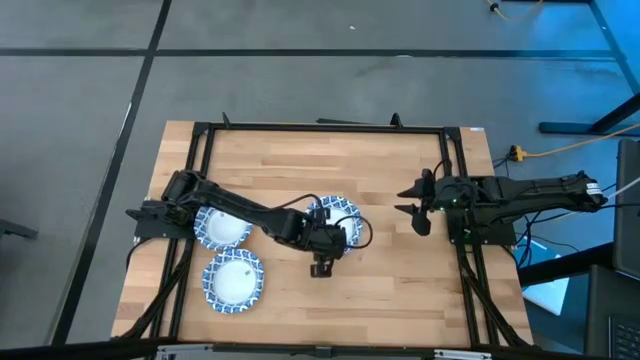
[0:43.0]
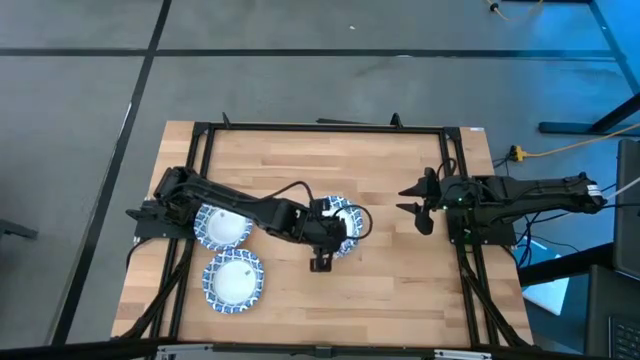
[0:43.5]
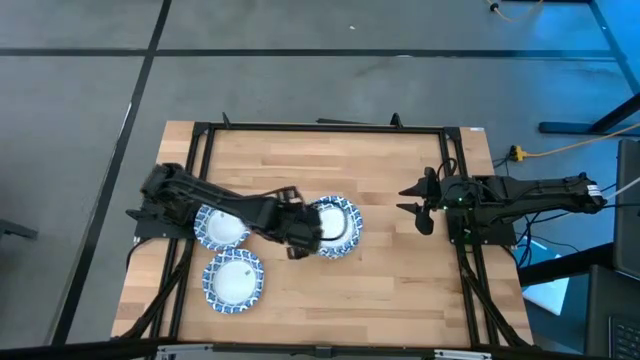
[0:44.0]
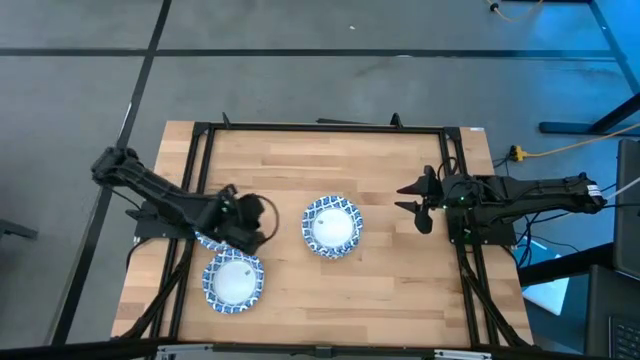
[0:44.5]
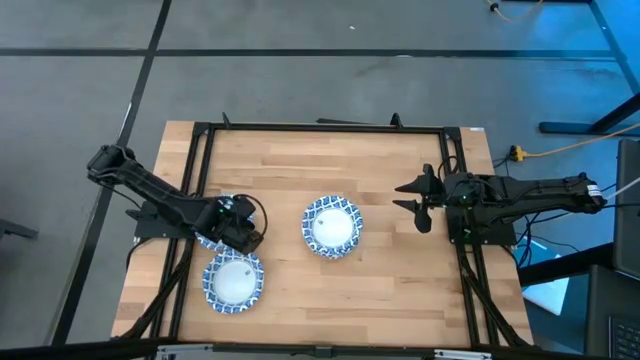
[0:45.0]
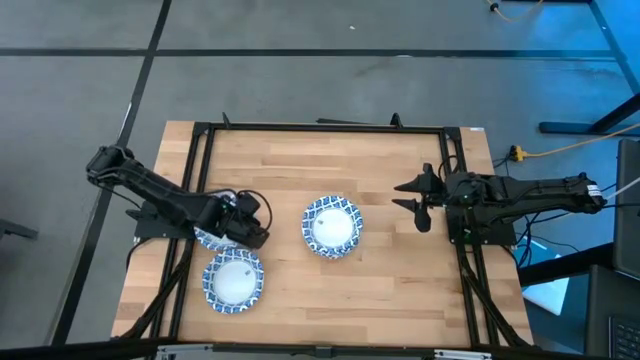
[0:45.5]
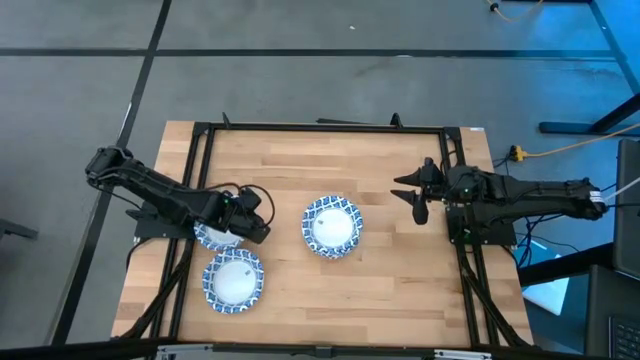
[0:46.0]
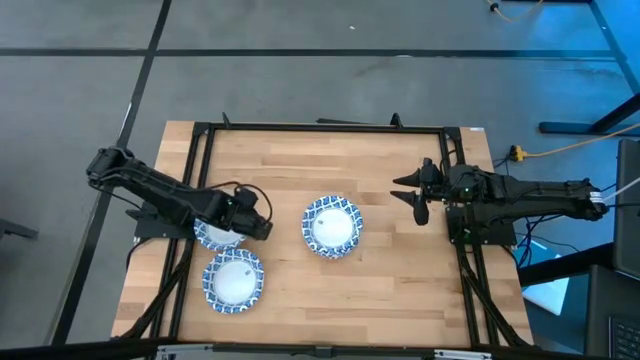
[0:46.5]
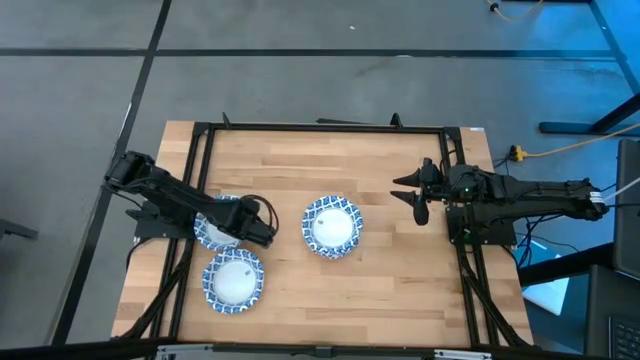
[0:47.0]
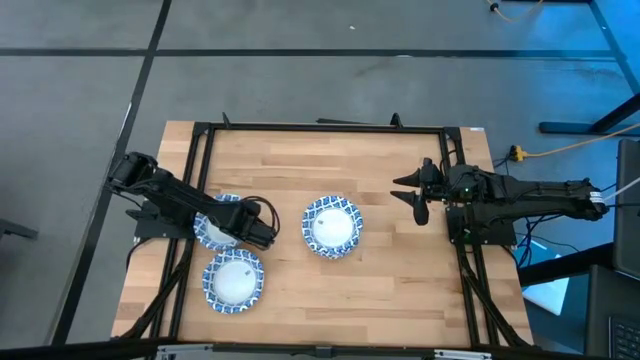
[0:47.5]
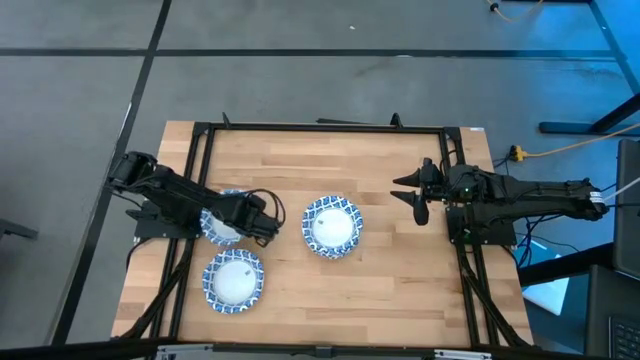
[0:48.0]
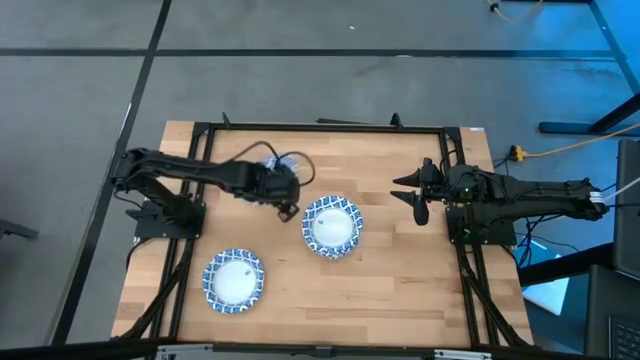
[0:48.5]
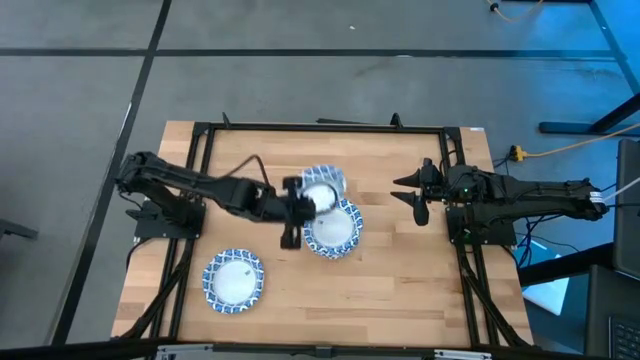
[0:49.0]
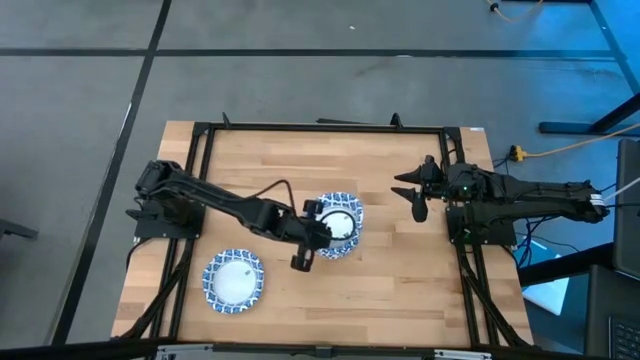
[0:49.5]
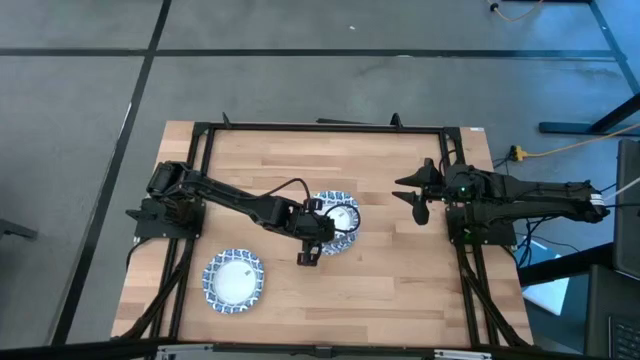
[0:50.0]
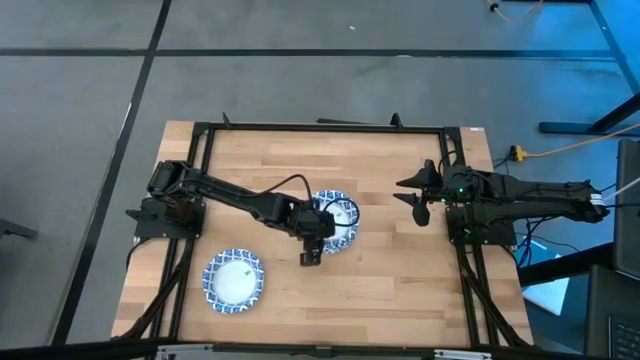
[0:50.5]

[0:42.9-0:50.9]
Task: Nest bowls inside each other
Stack the white bowl on top of the other white bowl

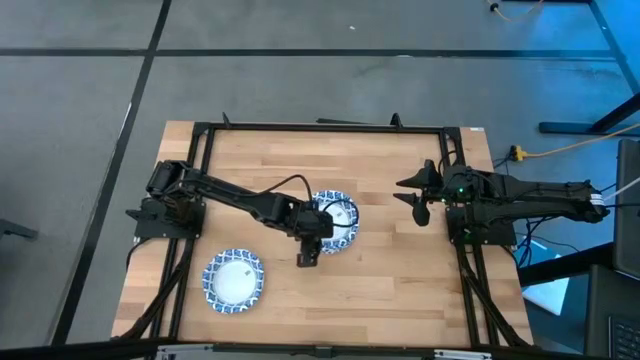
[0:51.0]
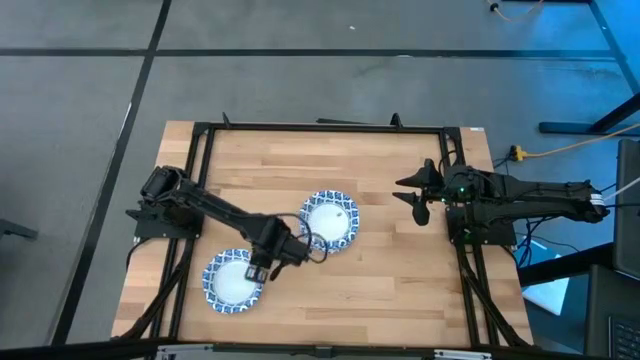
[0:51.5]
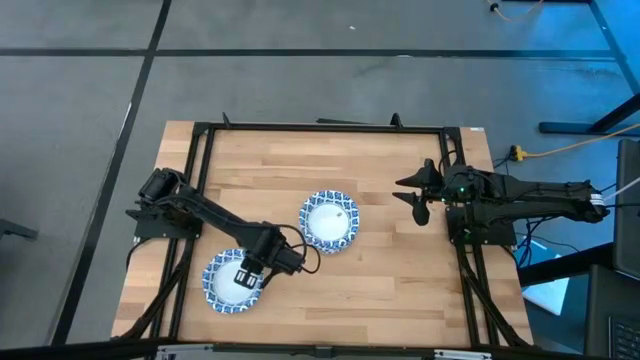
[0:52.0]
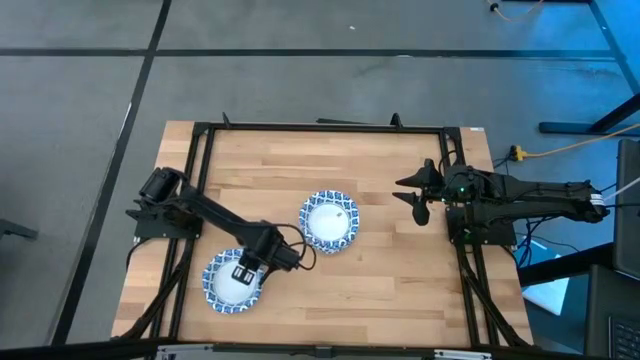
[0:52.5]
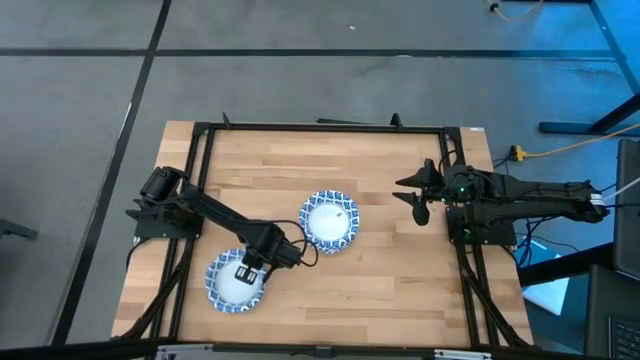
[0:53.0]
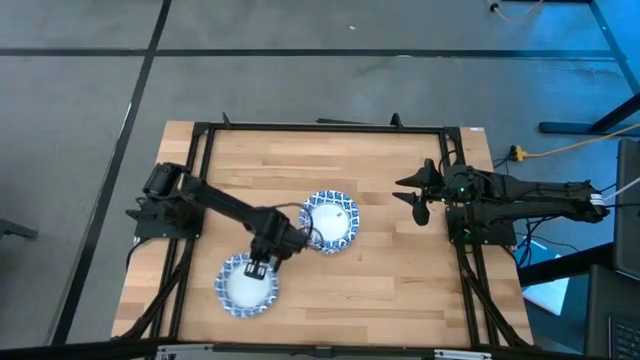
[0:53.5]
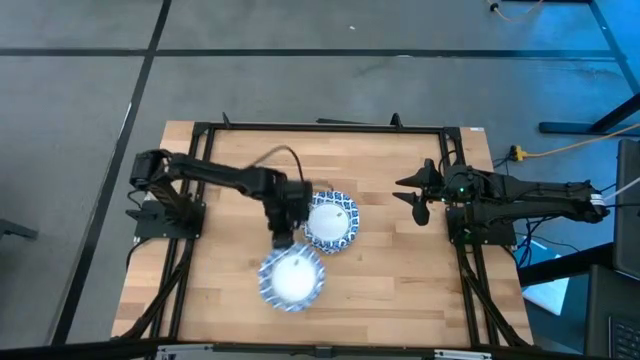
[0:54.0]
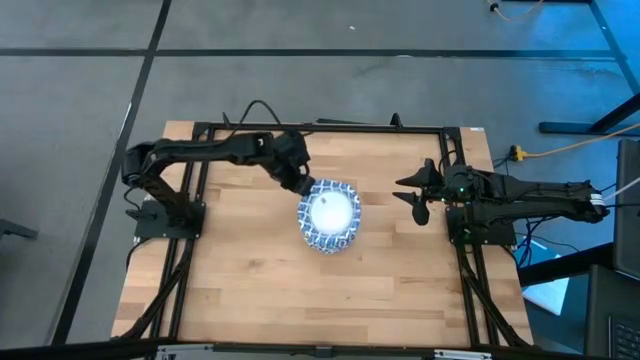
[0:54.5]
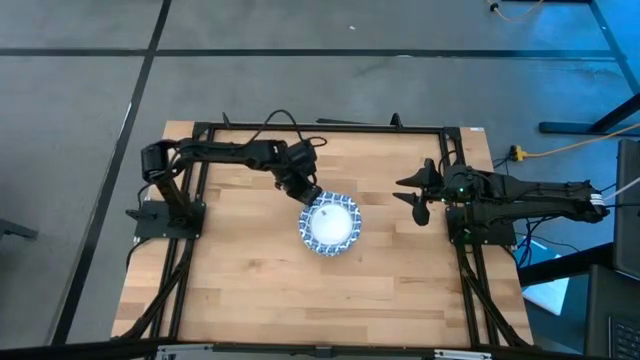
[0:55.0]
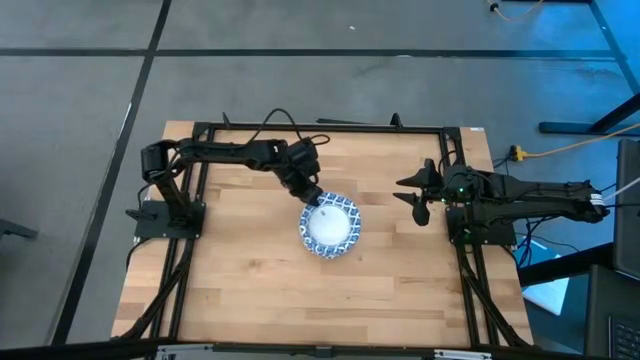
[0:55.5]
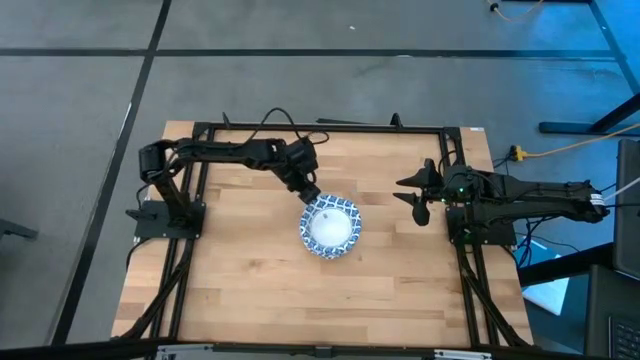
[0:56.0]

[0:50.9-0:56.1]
Stack the white bowl on top of the other white bowl

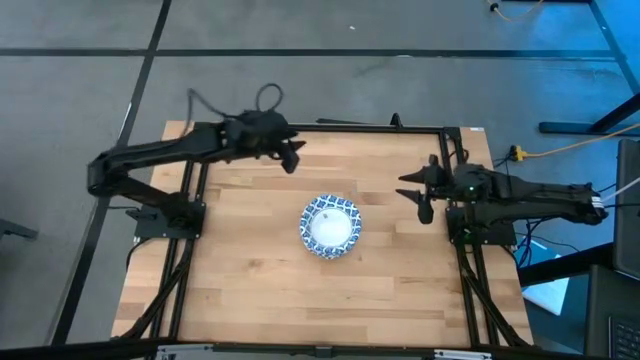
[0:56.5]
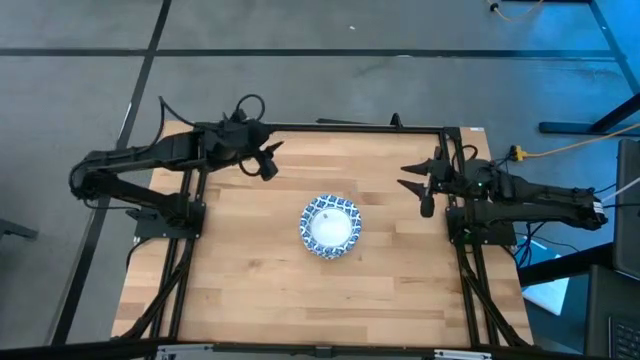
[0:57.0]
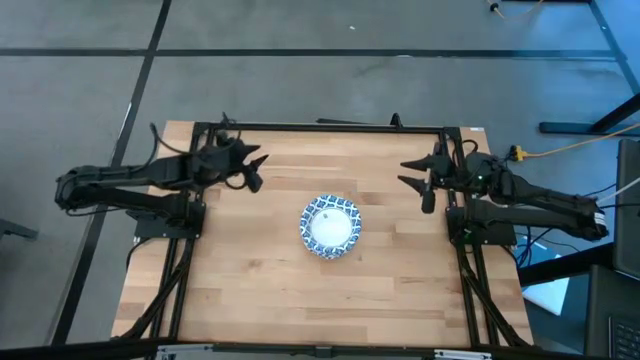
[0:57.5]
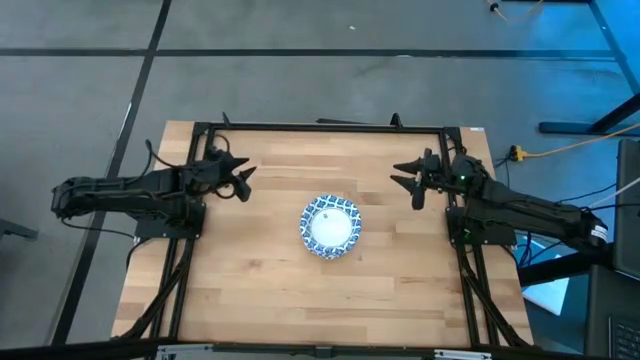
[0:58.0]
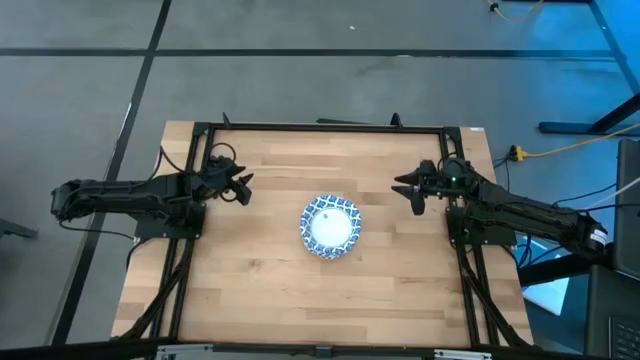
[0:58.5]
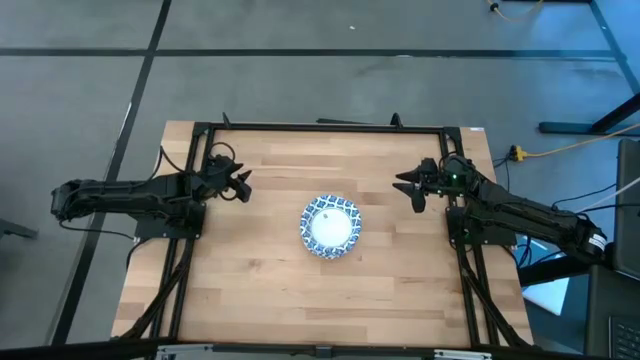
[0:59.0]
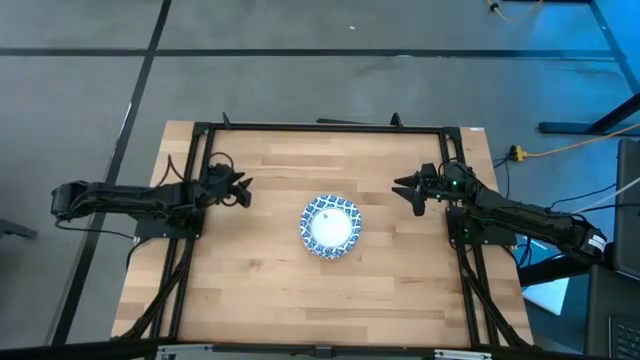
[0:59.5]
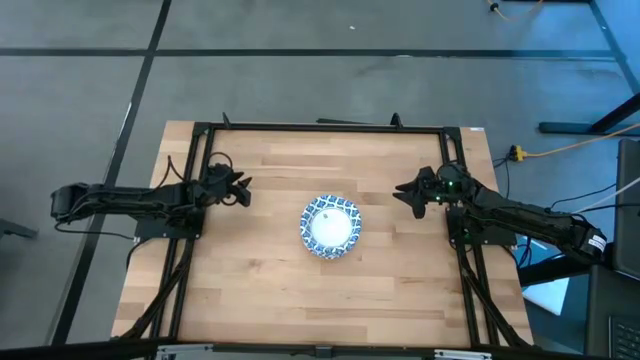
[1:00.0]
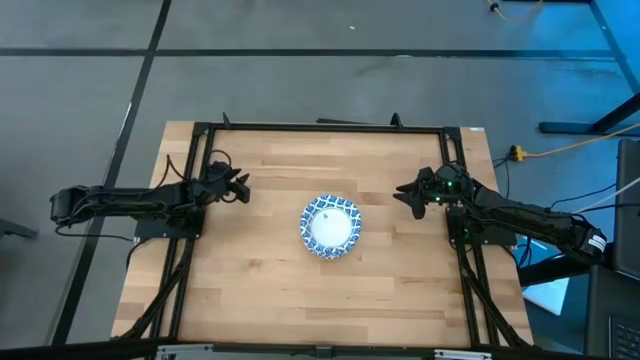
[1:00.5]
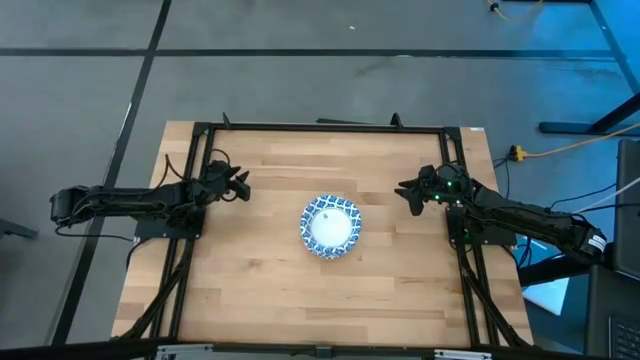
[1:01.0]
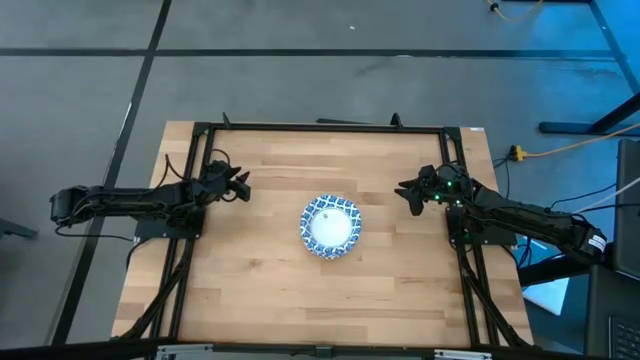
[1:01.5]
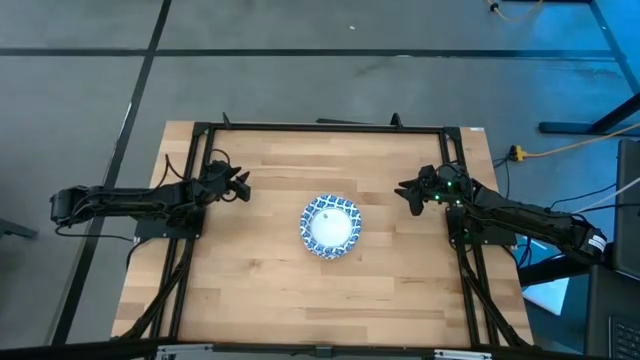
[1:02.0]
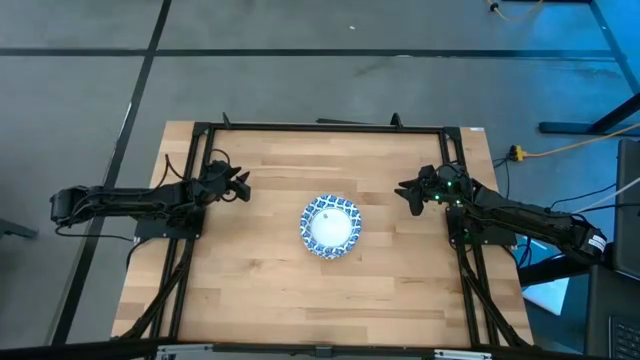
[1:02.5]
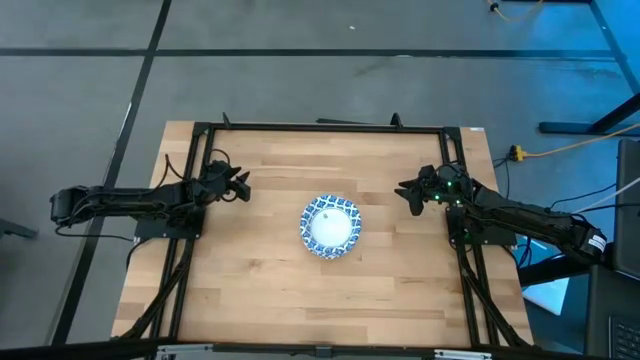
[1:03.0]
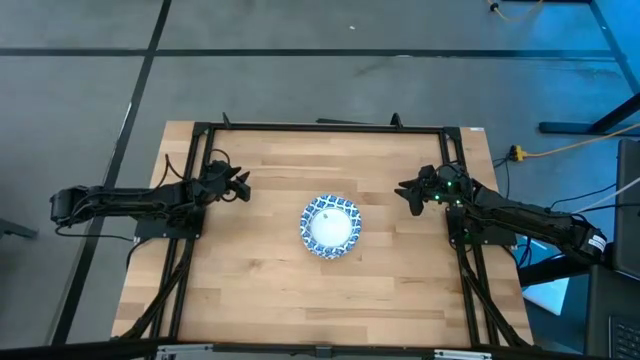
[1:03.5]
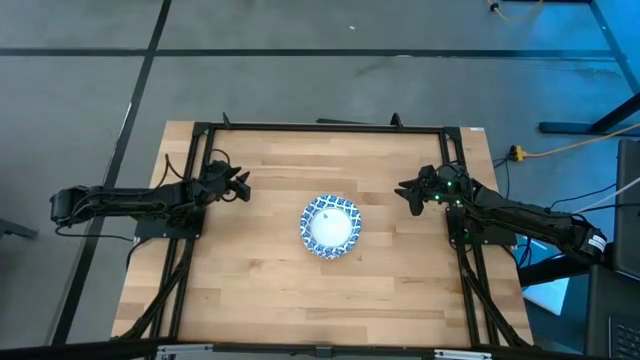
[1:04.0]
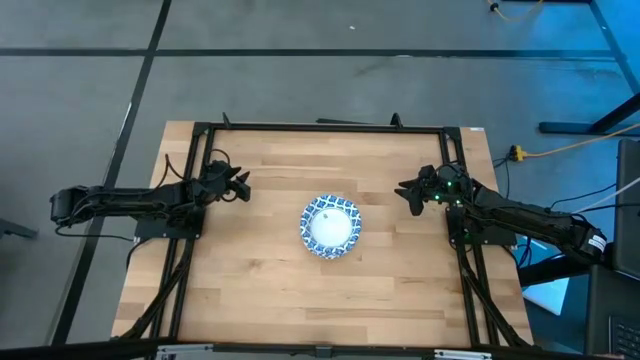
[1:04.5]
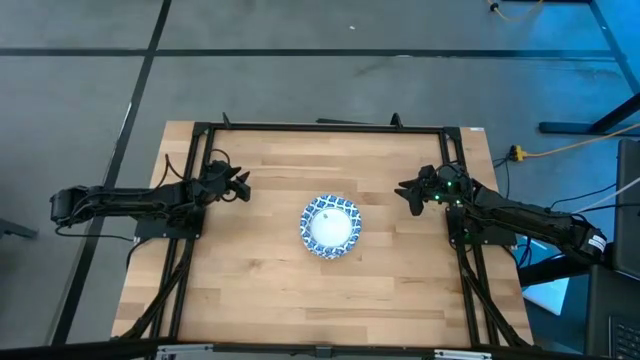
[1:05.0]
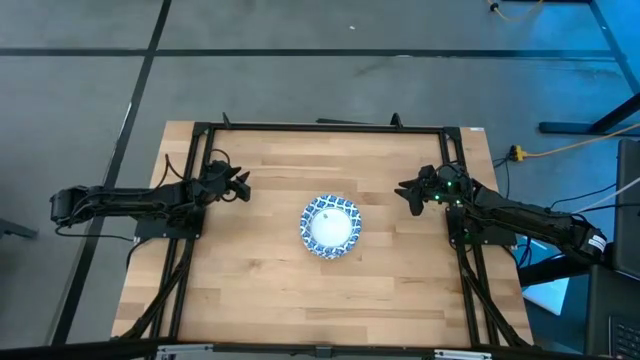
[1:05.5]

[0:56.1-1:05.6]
Return to Home Position
